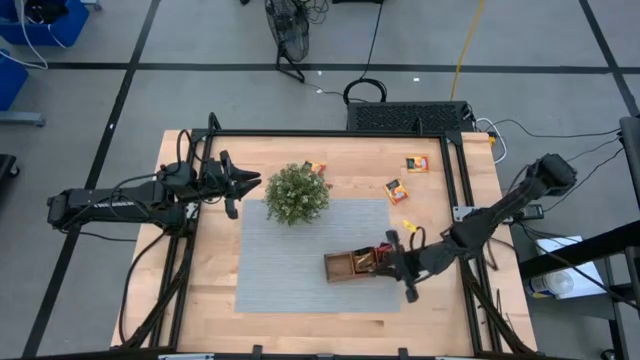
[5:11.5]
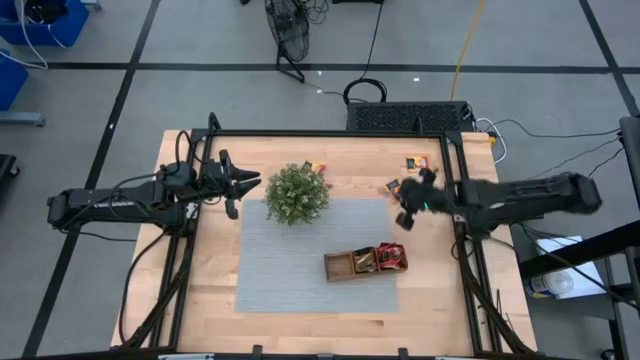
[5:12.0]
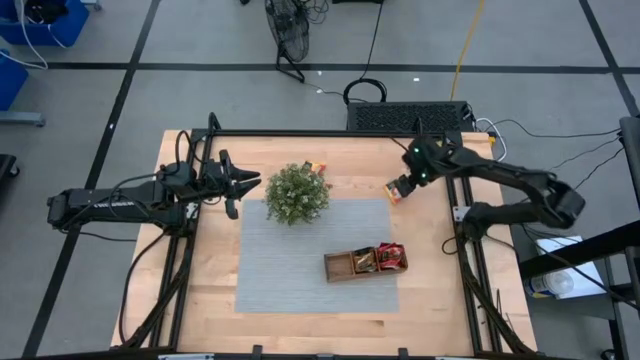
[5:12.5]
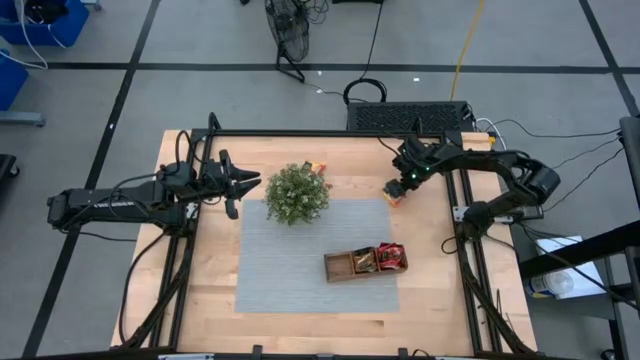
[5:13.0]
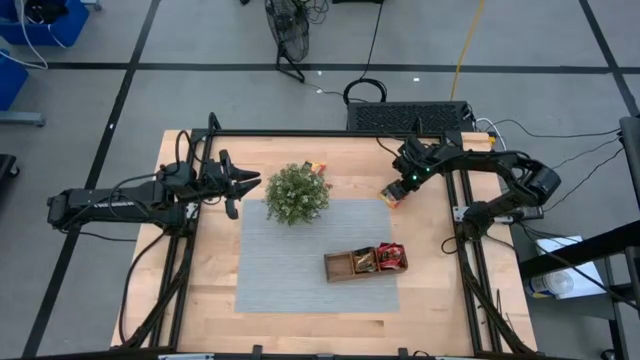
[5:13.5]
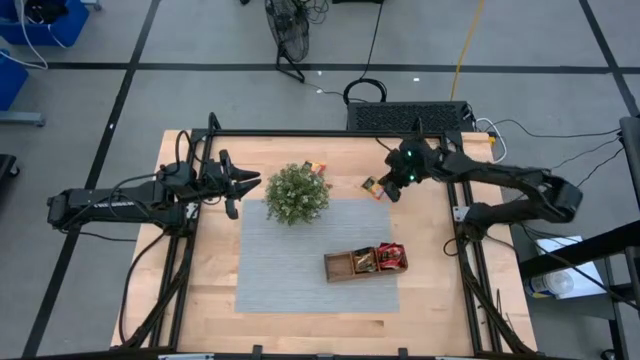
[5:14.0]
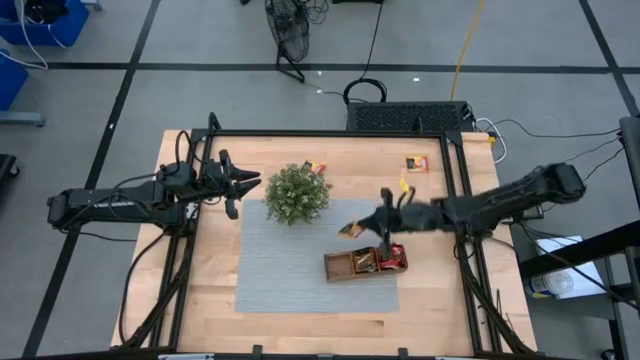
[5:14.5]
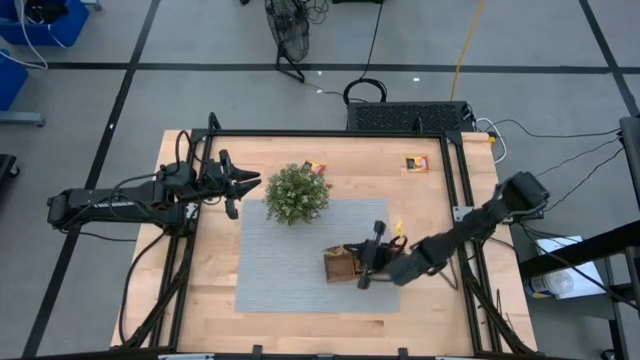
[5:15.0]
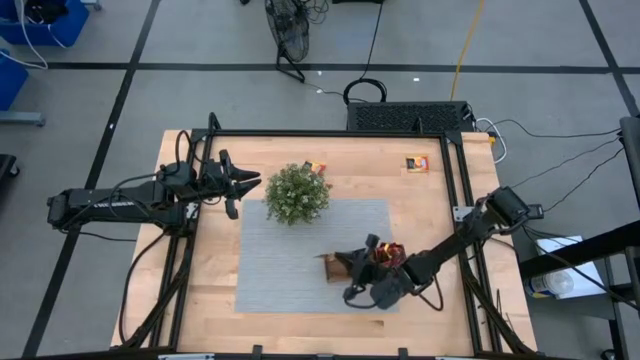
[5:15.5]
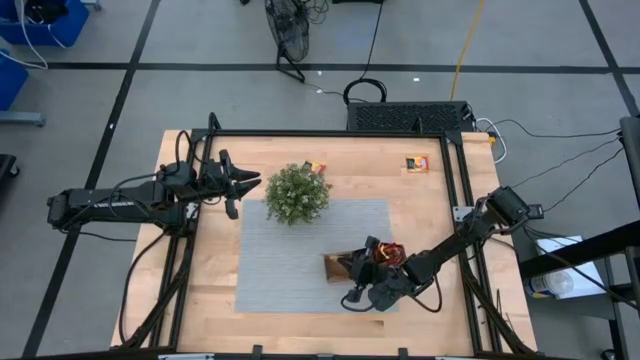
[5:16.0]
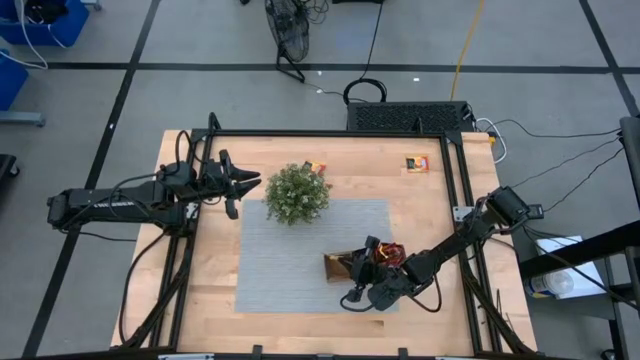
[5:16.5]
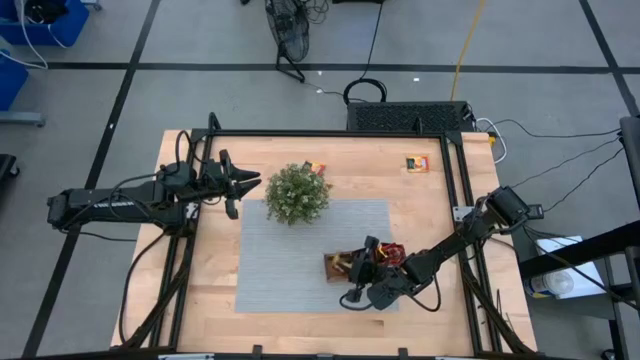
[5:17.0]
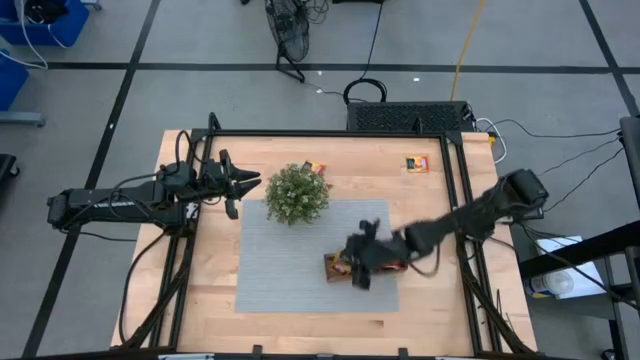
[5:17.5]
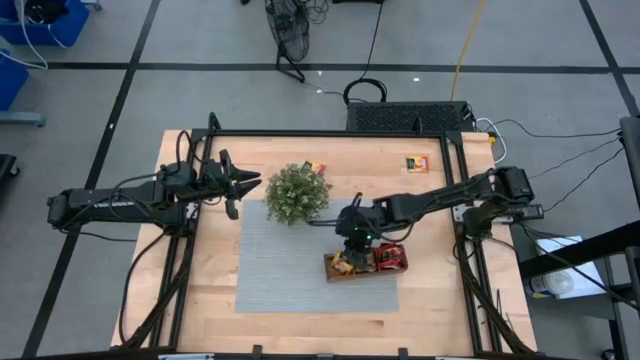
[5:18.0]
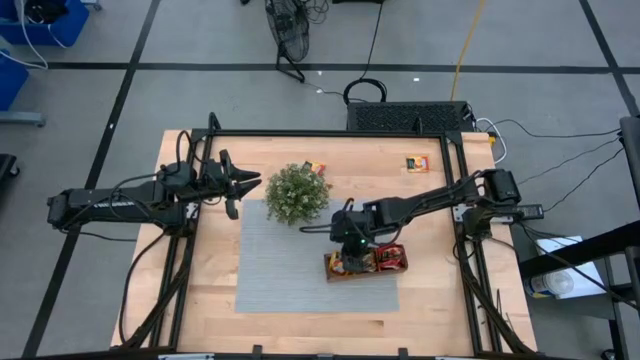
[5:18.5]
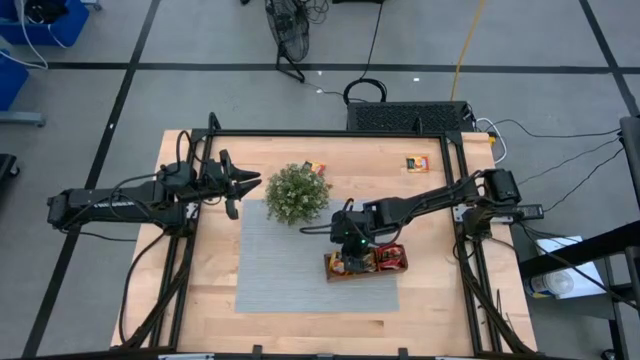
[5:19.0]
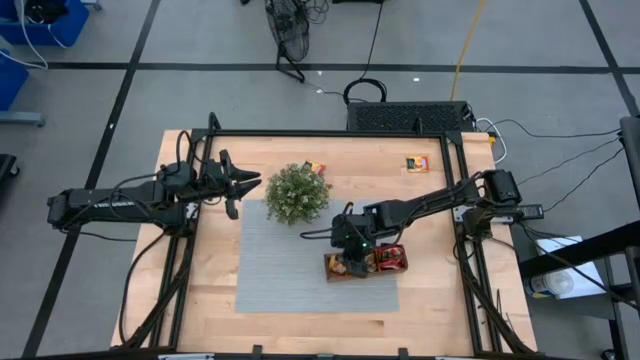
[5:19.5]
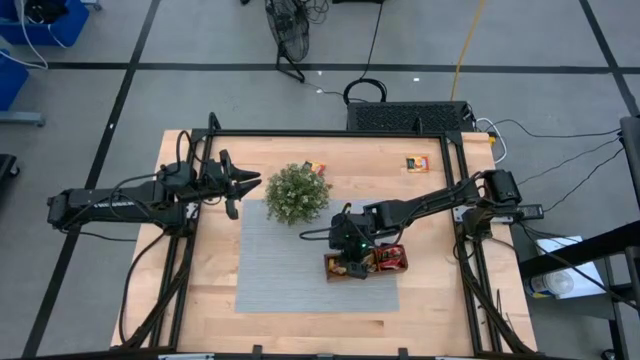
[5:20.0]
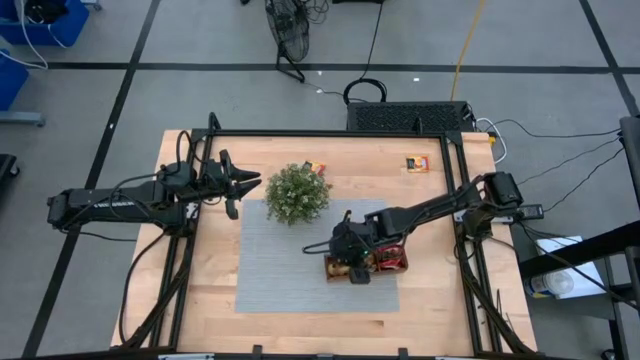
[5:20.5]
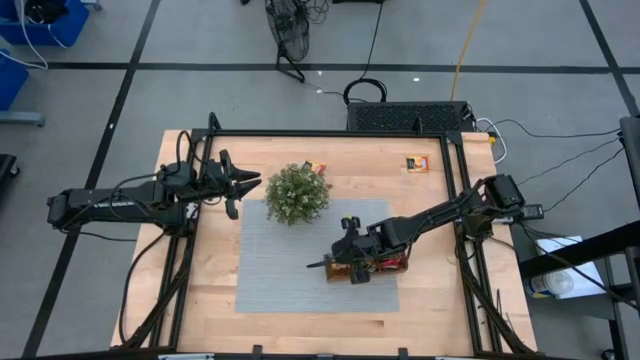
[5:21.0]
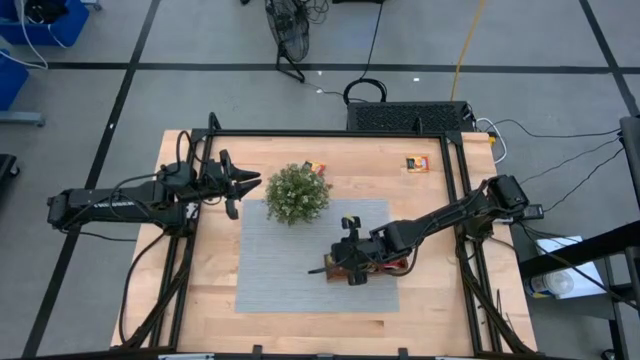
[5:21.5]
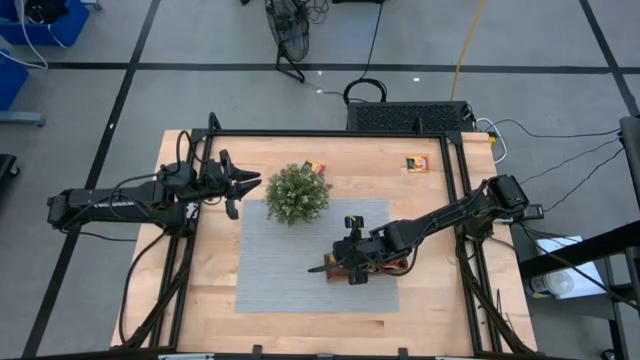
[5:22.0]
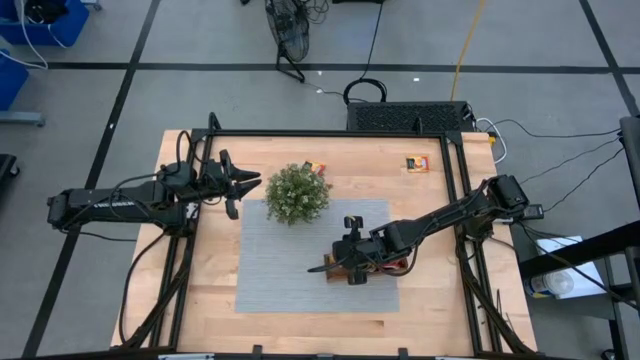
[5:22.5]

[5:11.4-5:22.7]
Task: Pick & Place Tea
Put the mango tea sachet into the brown organizer

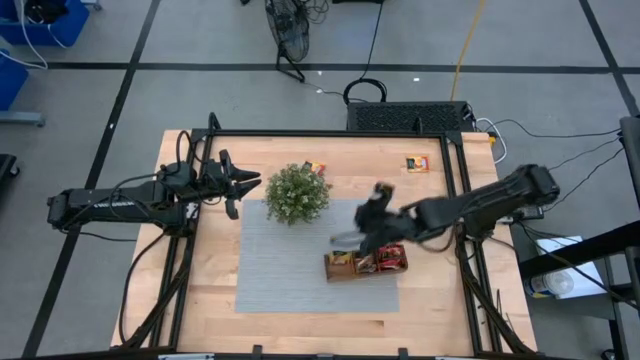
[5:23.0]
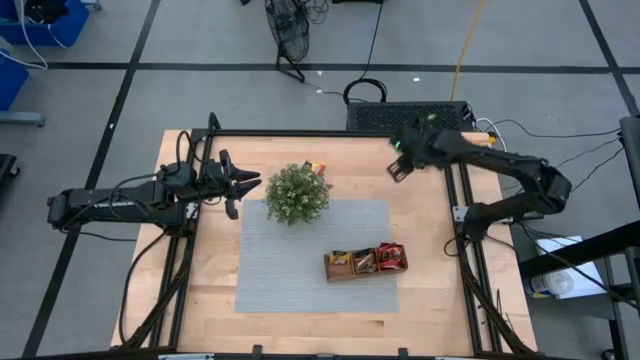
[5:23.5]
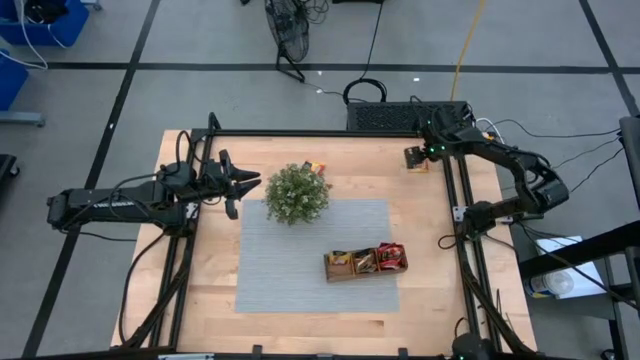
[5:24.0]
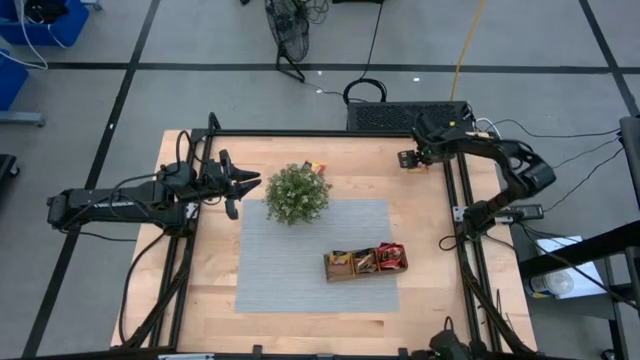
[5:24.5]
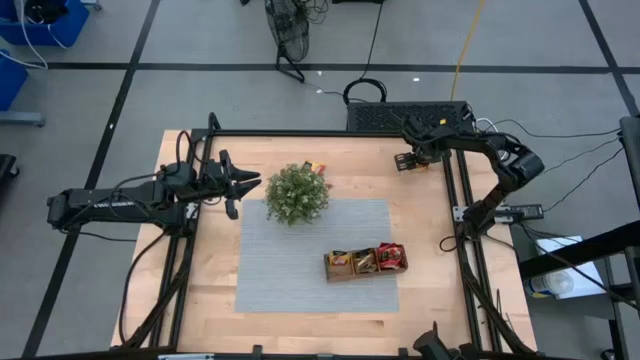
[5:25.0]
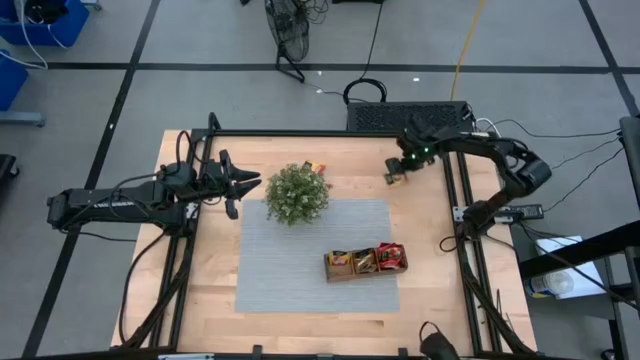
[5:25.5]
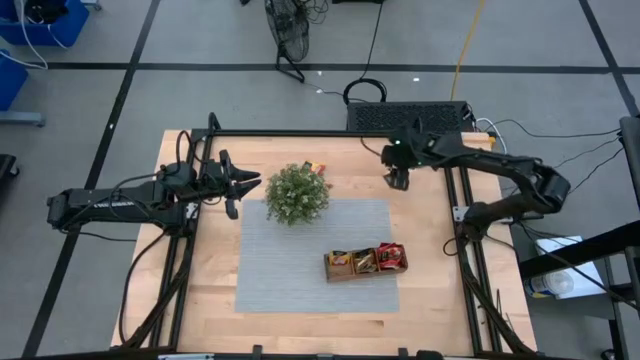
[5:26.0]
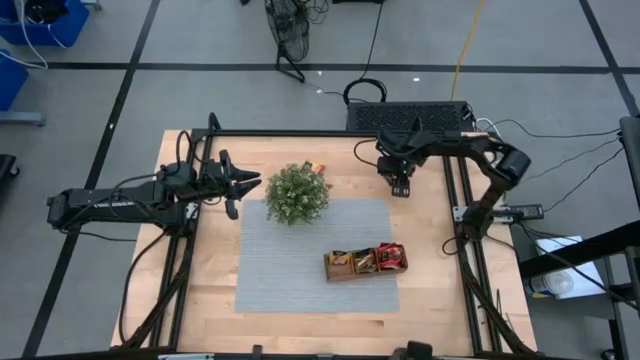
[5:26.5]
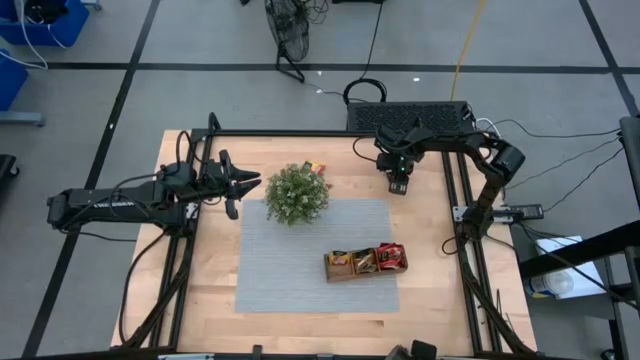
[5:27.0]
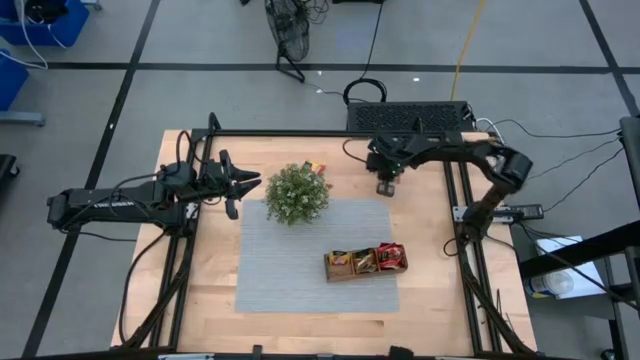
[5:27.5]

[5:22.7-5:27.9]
Put the mango tea sachet into the brown organizer
